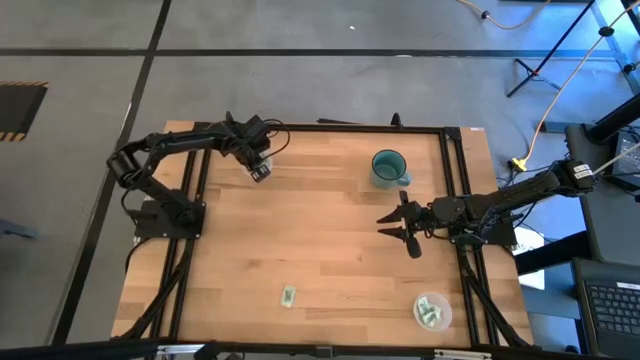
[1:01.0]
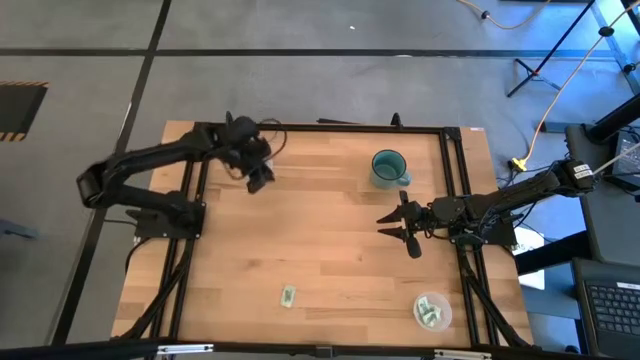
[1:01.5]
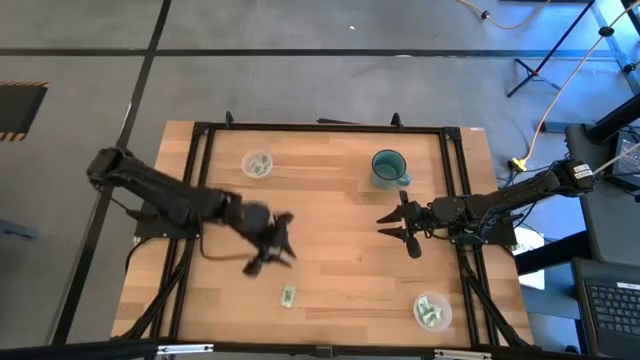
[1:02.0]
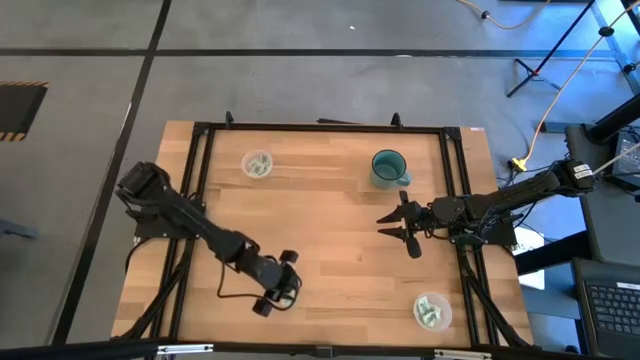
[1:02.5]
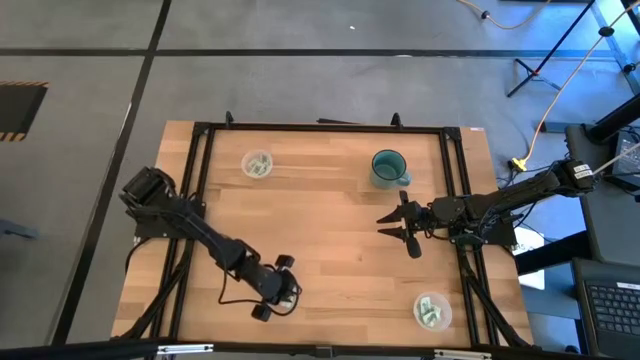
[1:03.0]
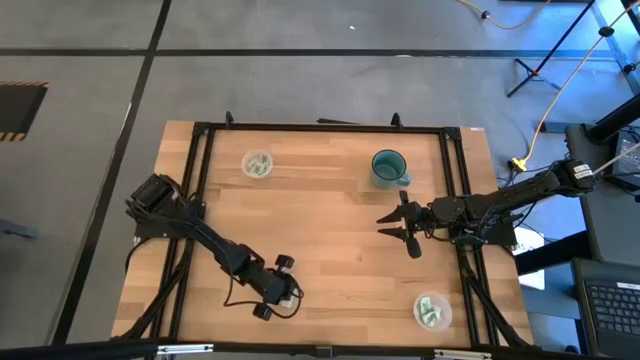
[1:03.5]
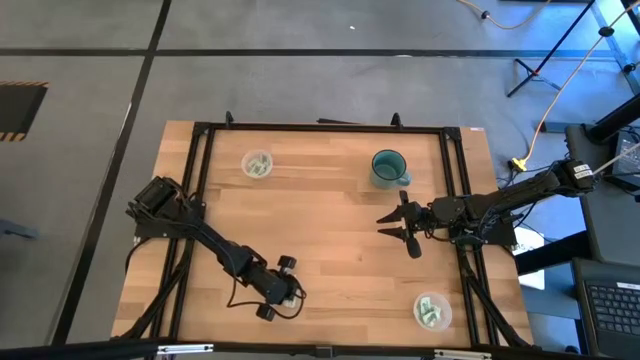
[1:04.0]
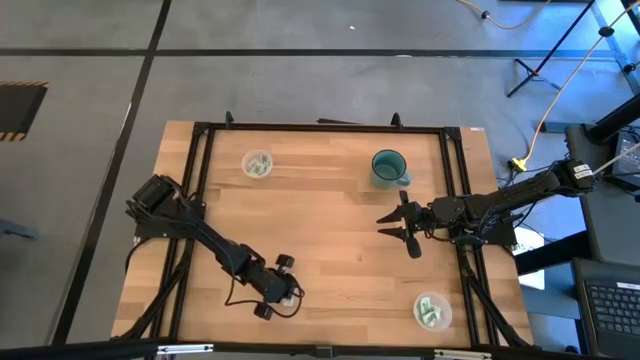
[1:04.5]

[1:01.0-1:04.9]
Task: Pick and place Stevia / Truvia into bins
Put the stevia packet into the top transparent container

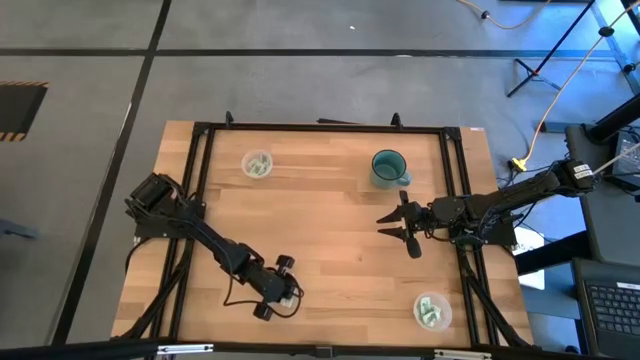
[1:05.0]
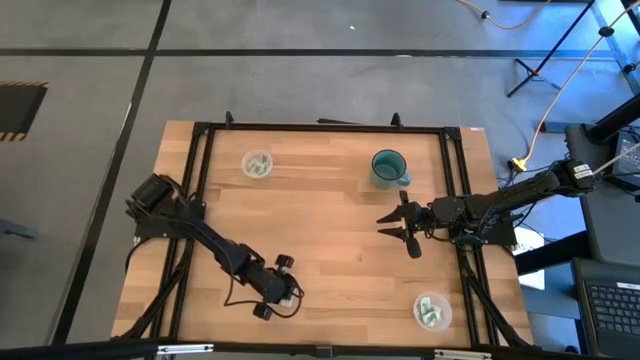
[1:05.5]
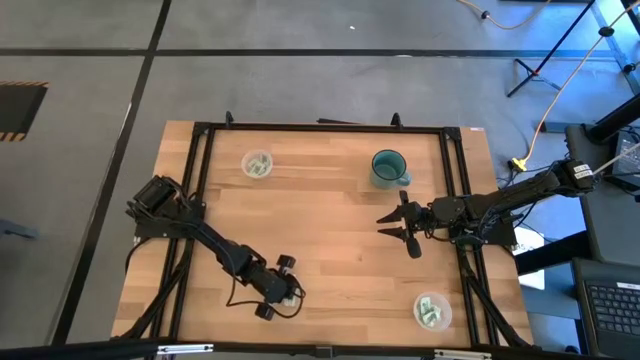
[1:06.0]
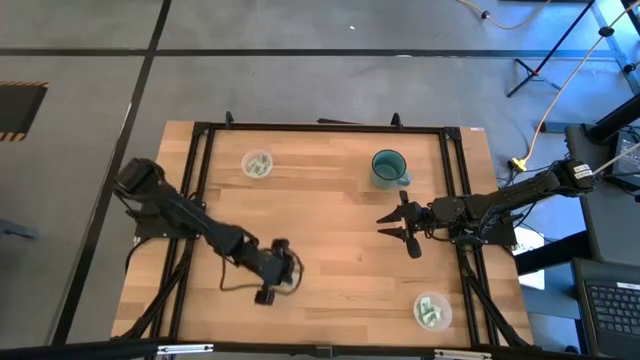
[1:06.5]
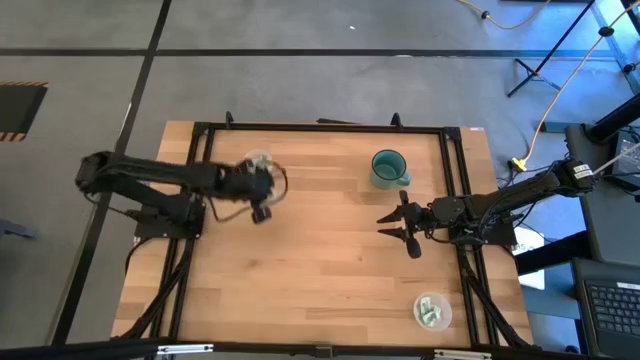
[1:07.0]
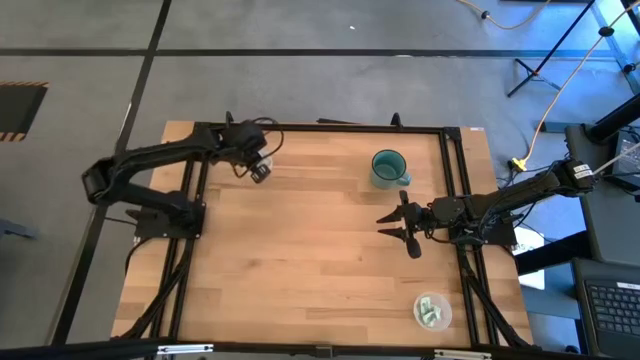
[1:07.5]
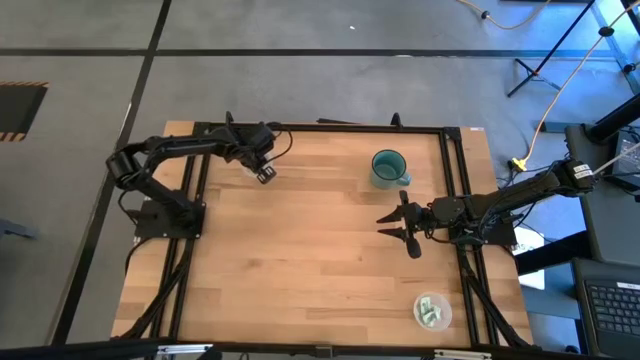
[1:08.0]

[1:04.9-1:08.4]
Put the stevia packet into the top transparent container

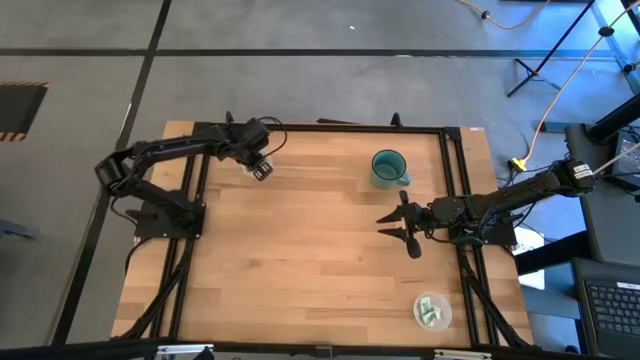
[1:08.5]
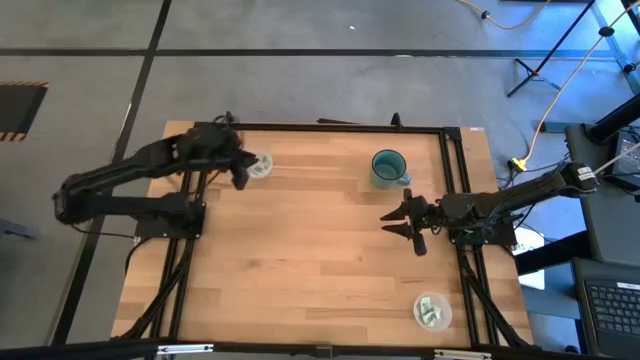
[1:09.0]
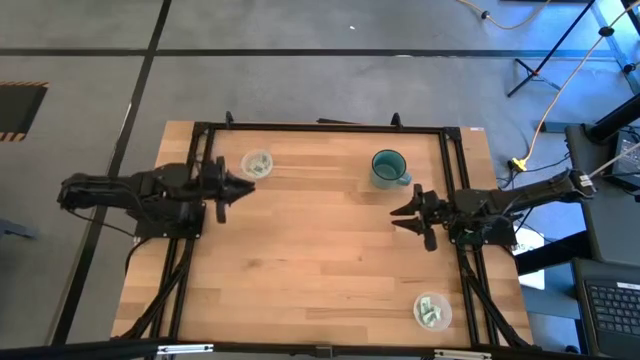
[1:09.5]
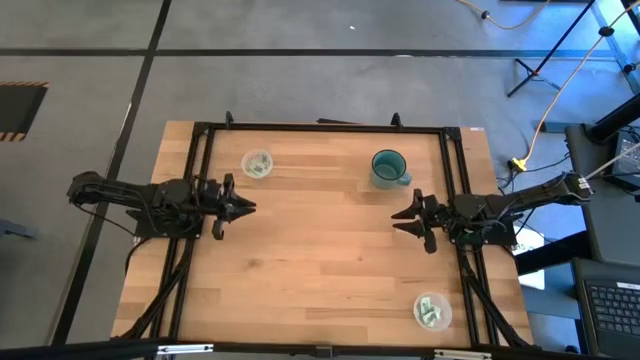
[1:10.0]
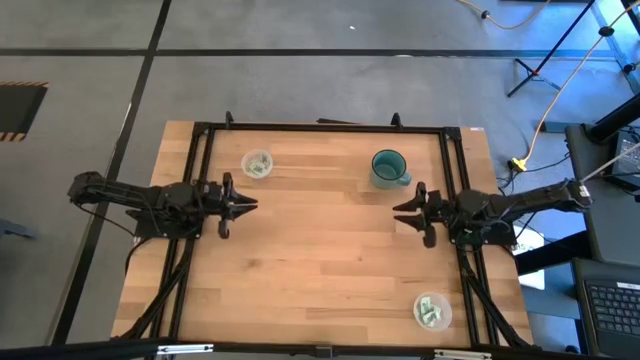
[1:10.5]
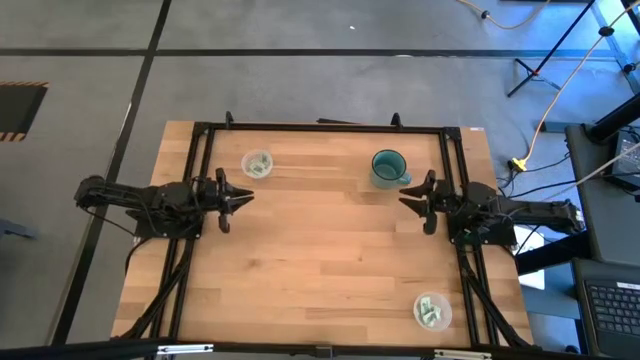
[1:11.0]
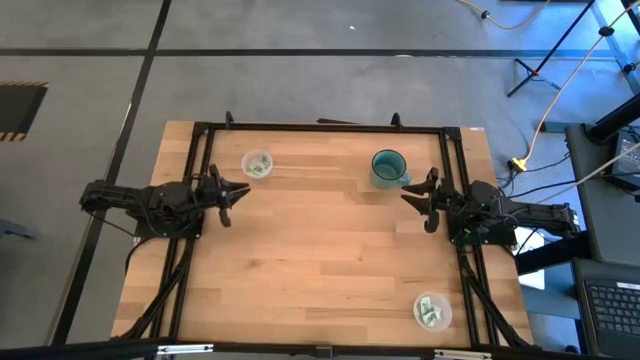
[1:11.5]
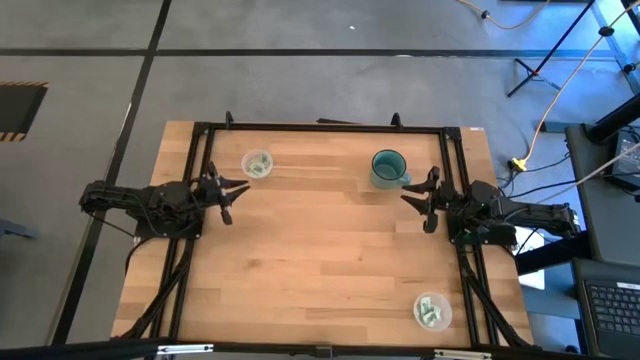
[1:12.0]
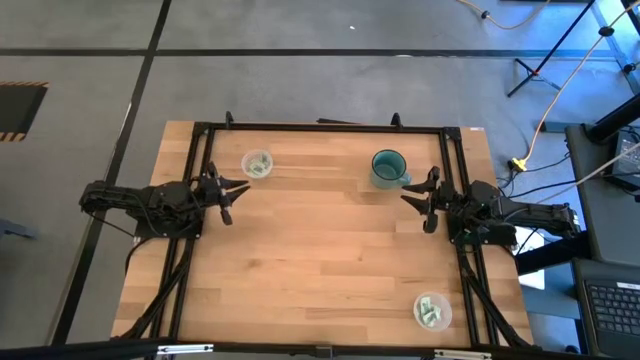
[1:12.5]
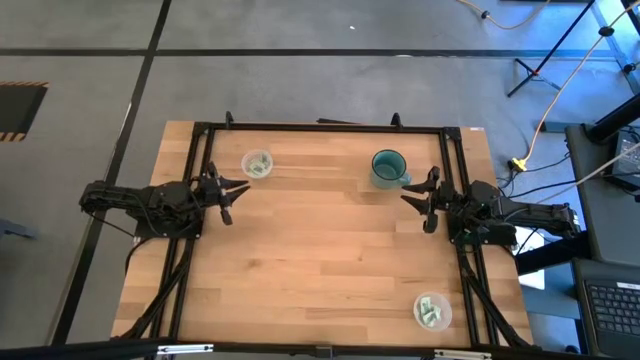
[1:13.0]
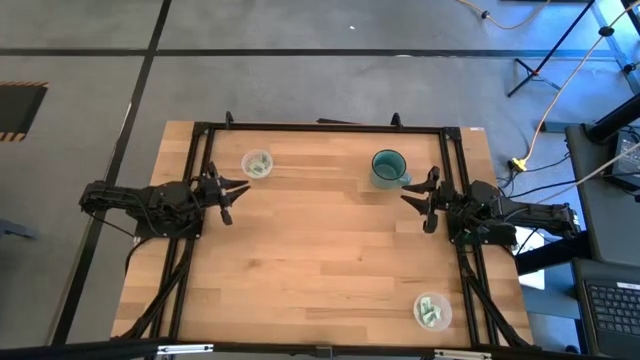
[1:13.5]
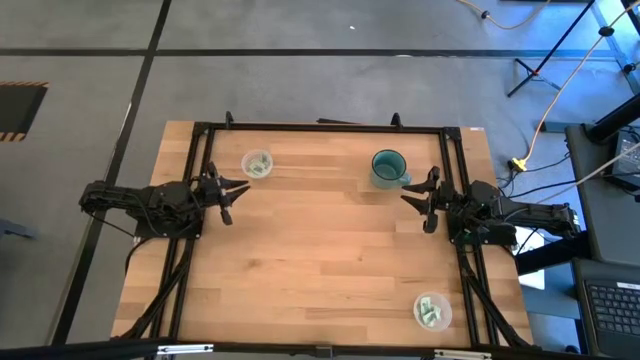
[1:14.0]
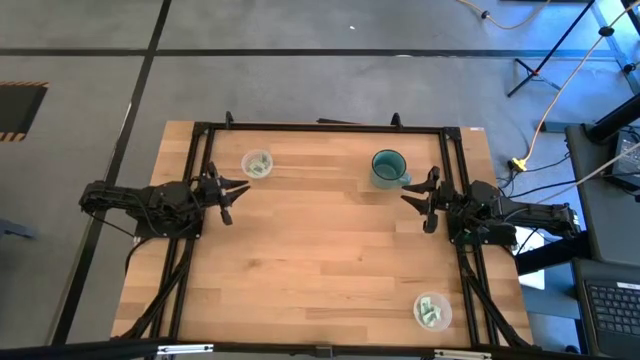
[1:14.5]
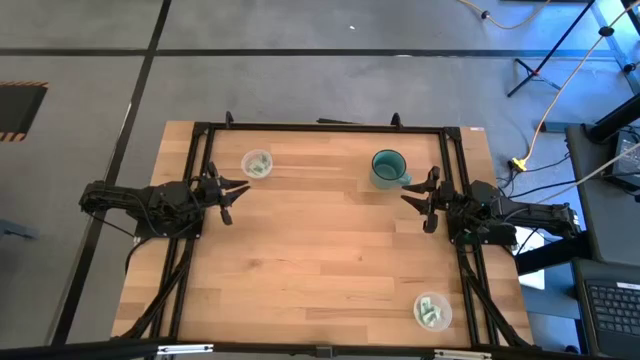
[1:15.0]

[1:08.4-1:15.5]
Return to Home Position

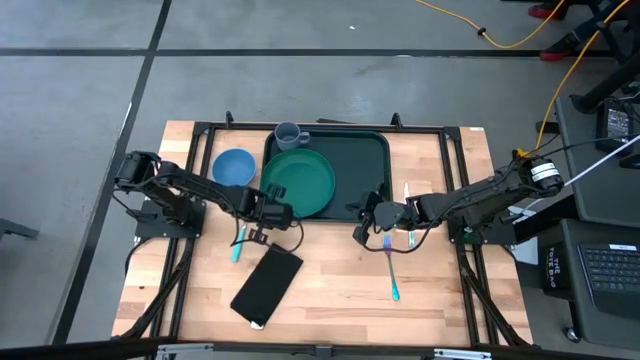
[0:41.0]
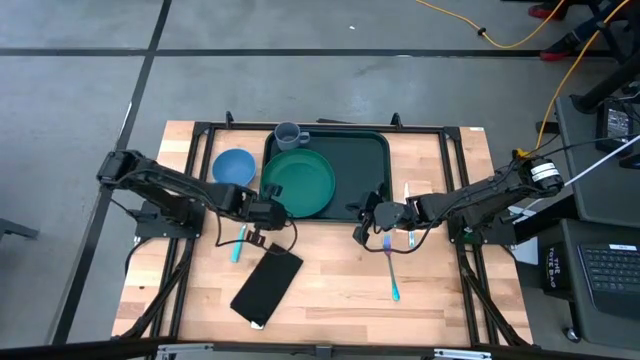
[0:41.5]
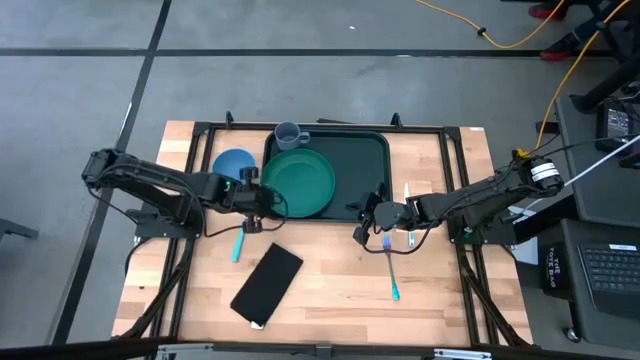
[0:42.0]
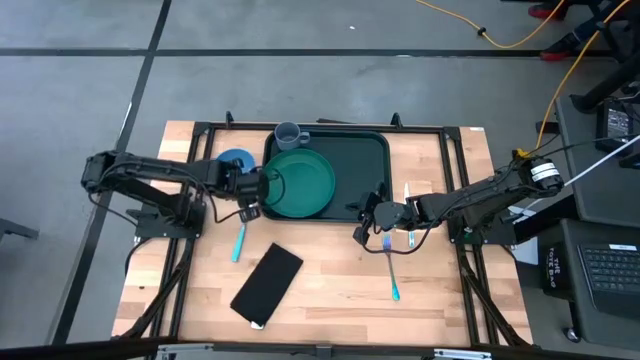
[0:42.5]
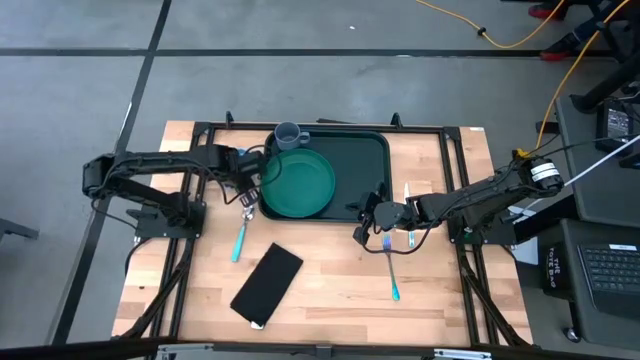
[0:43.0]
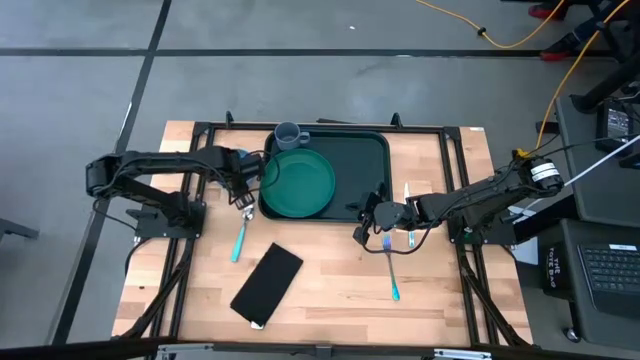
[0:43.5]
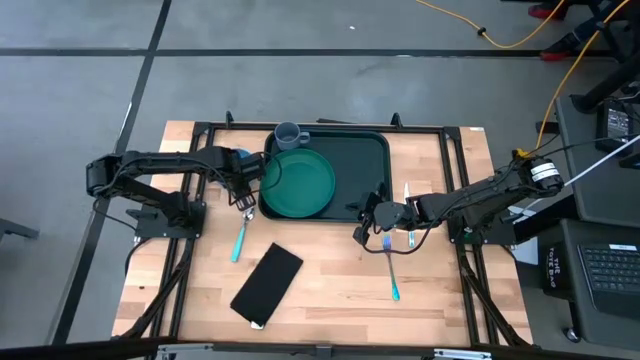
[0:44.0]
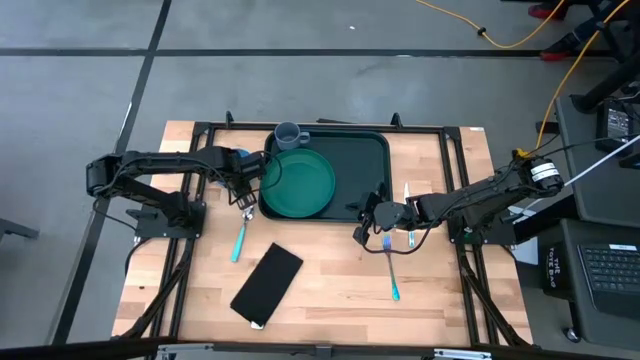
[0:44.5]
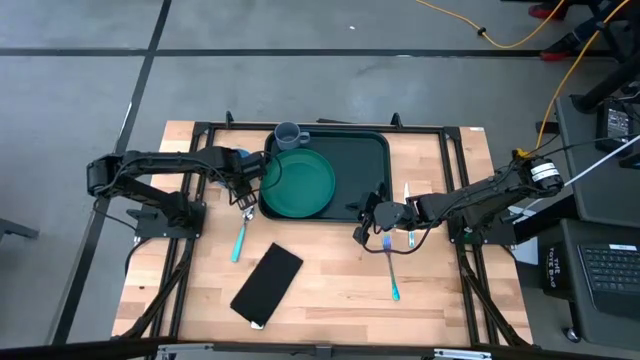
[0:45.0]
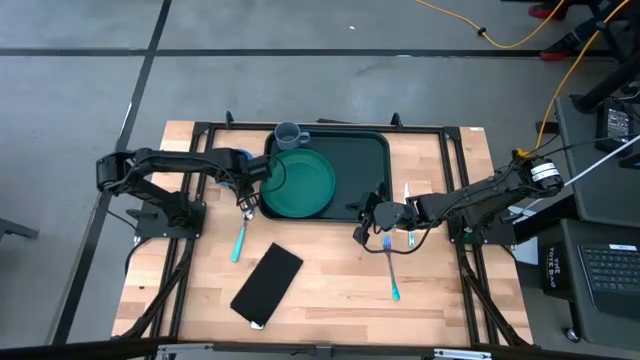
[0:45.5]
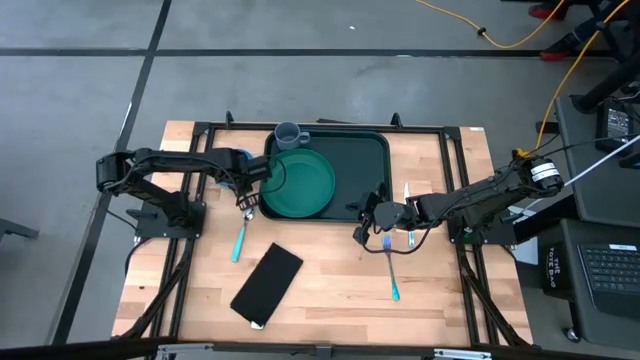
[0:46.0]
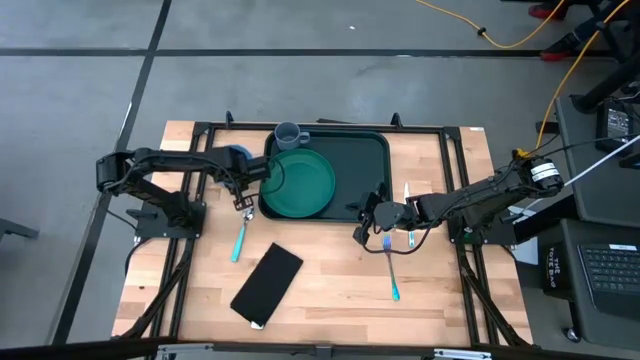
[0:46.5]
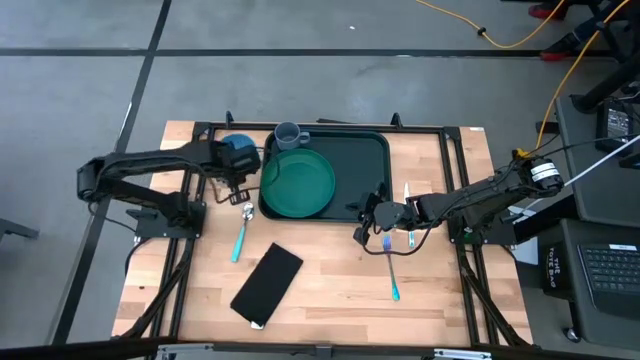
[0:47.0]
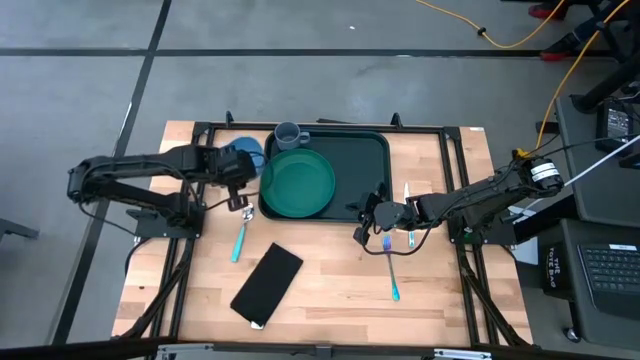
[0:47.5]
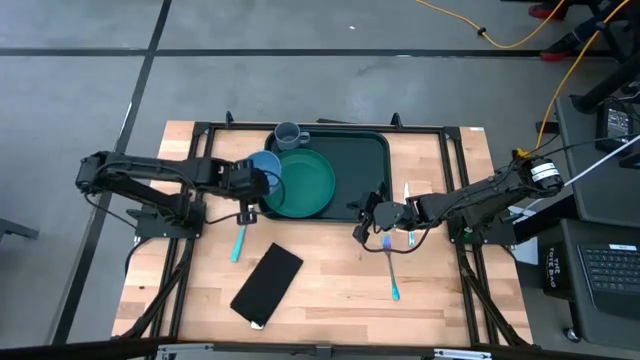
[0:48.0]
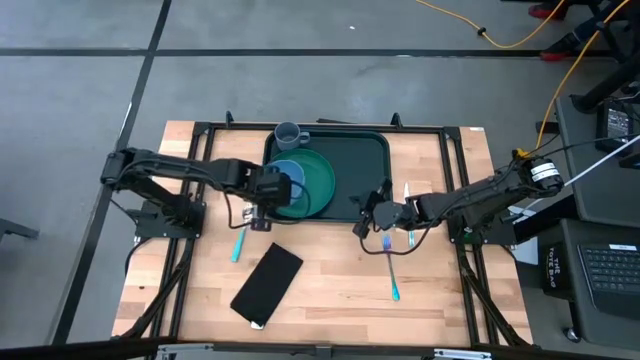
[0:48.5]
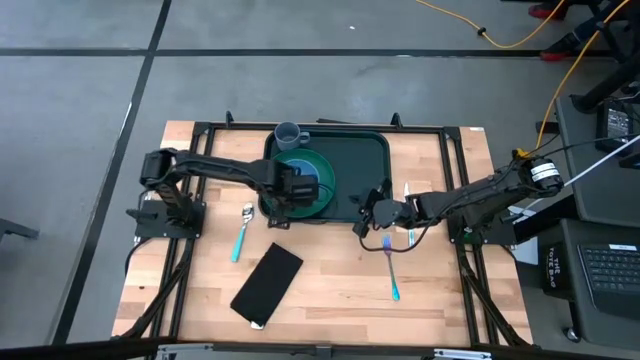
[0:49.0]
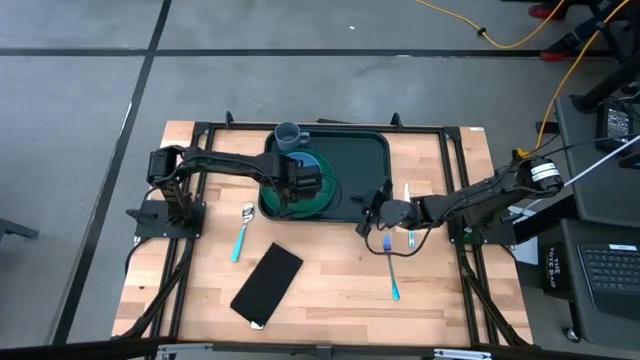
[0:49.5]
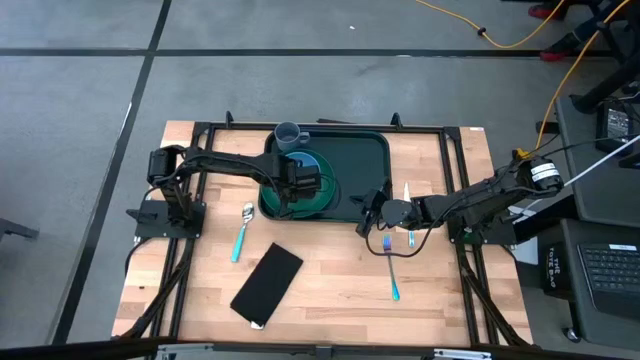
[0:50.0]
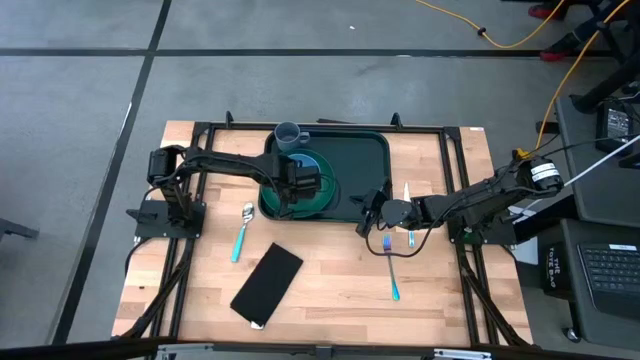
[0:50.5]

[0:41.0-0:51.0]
Task: Set up tray
Put the blue bowl on the green plate
